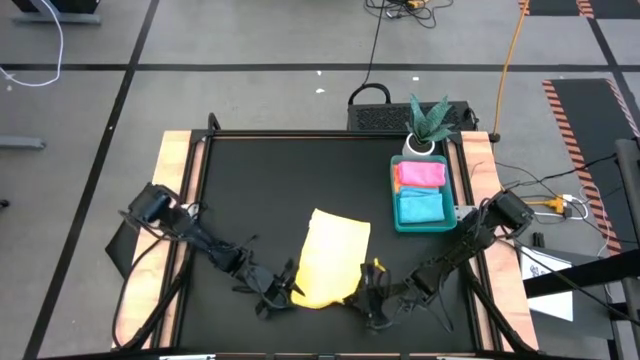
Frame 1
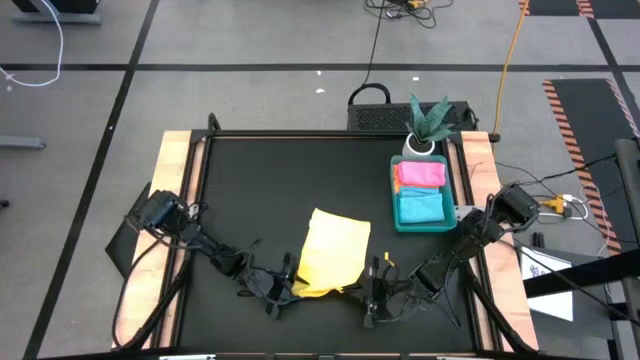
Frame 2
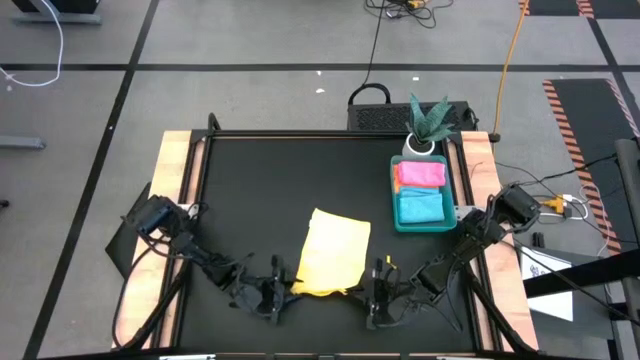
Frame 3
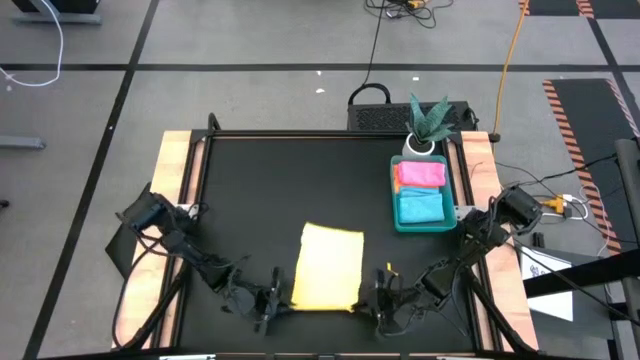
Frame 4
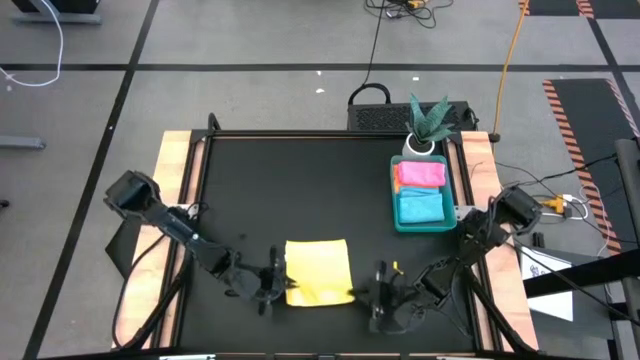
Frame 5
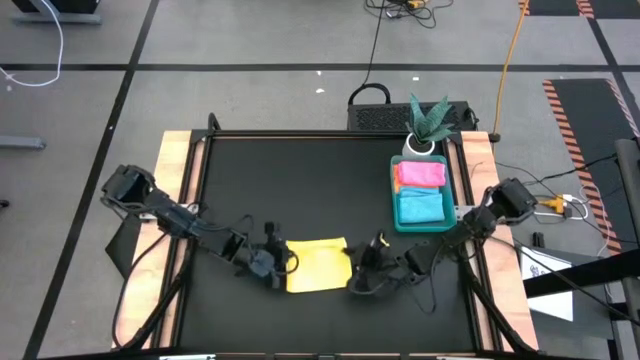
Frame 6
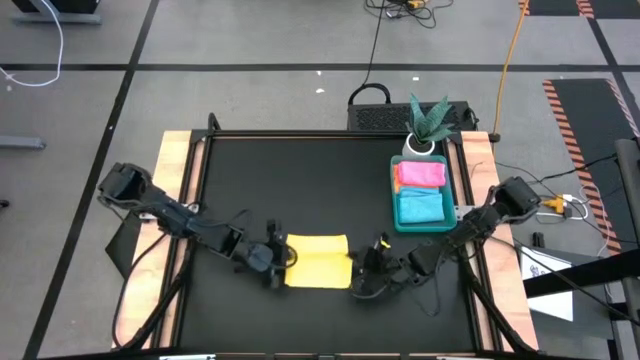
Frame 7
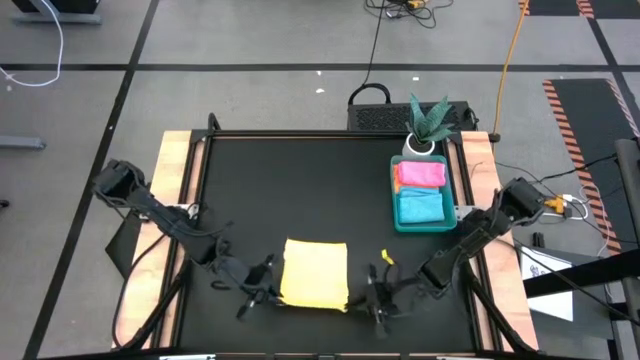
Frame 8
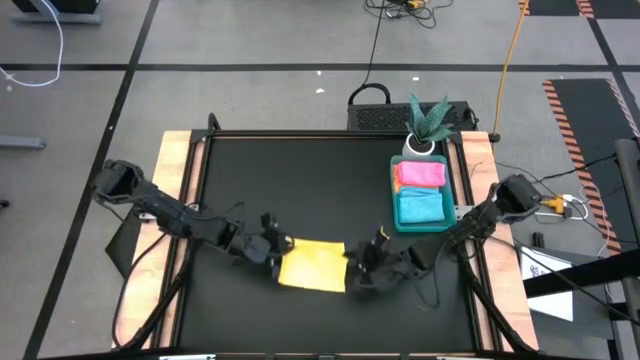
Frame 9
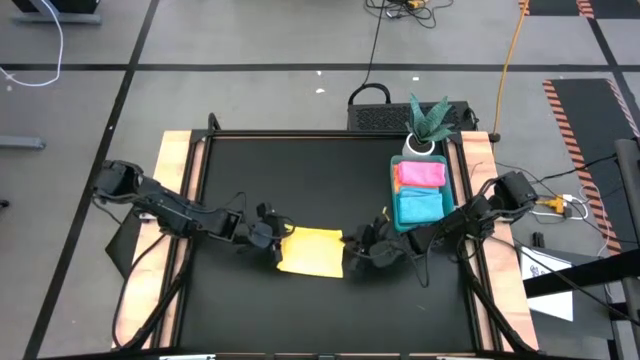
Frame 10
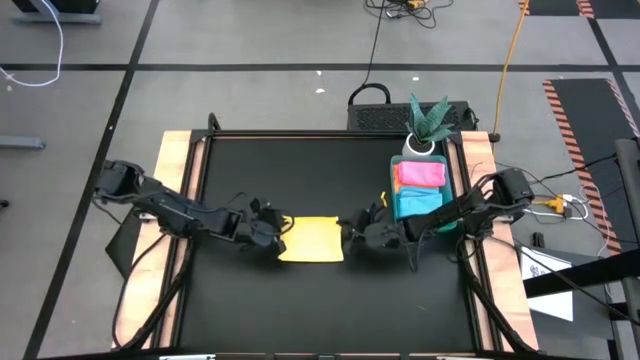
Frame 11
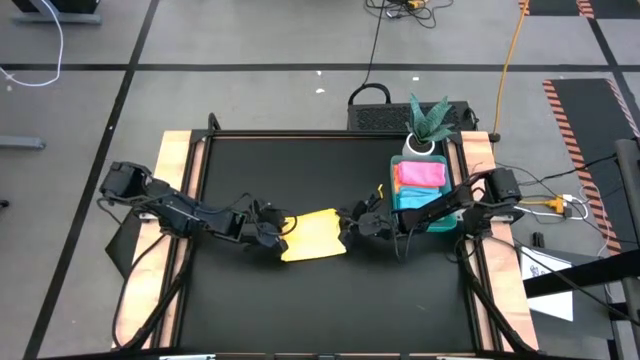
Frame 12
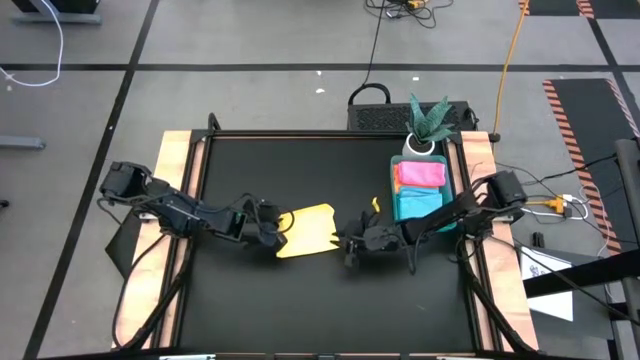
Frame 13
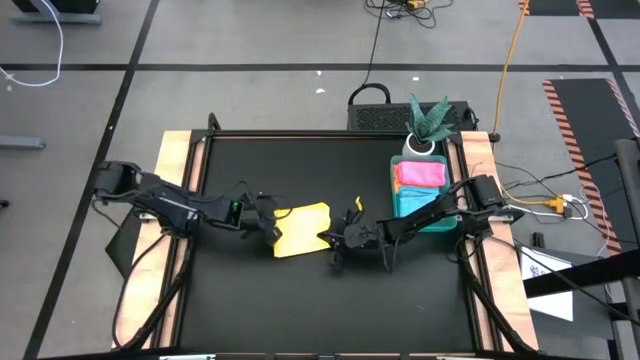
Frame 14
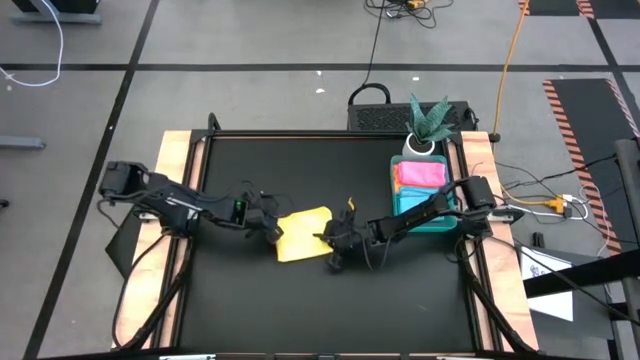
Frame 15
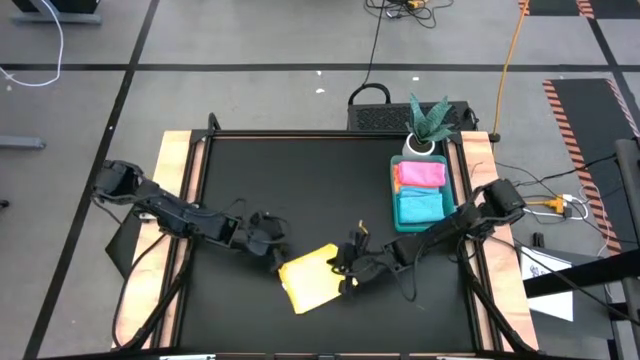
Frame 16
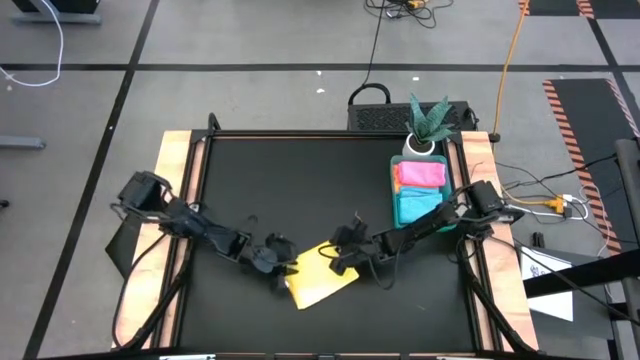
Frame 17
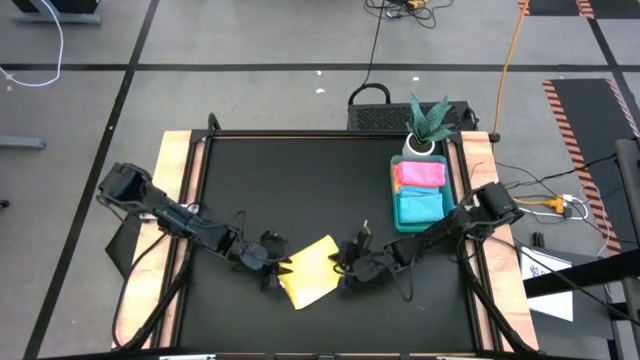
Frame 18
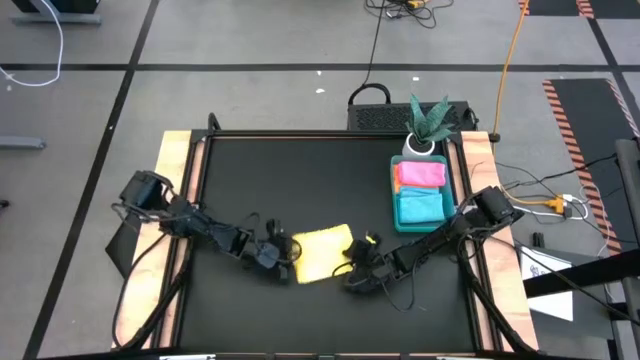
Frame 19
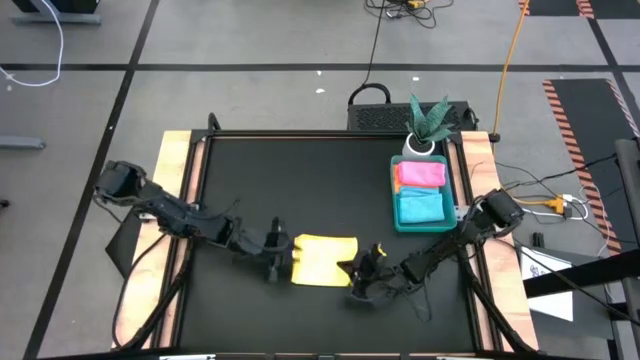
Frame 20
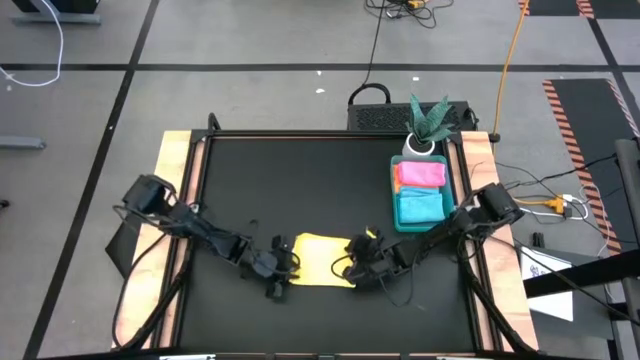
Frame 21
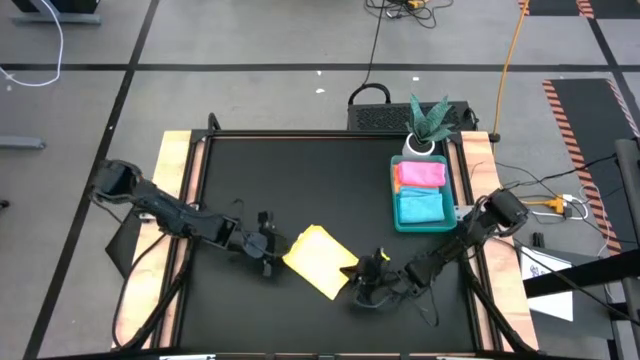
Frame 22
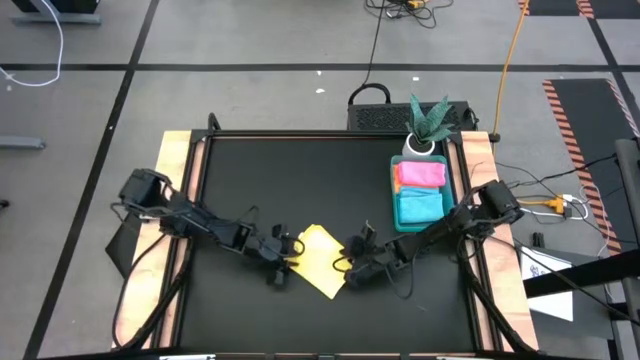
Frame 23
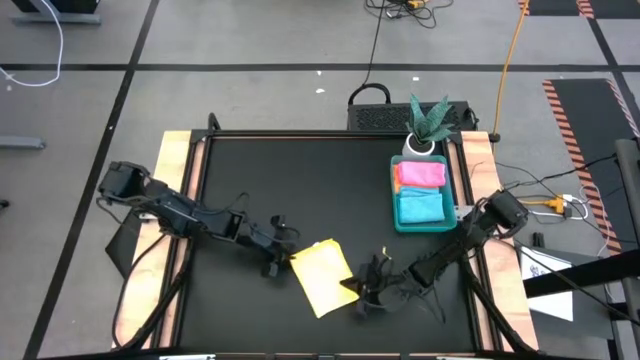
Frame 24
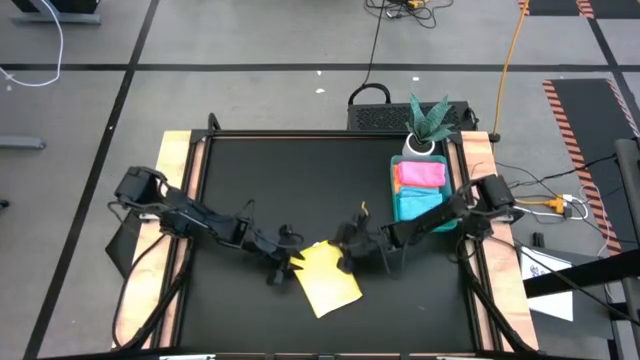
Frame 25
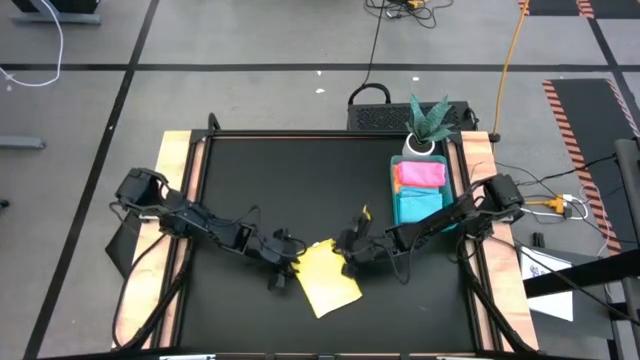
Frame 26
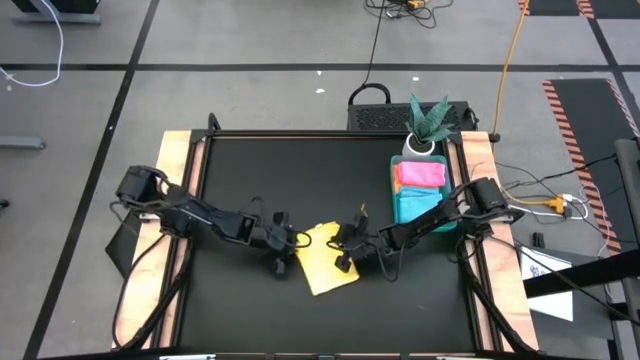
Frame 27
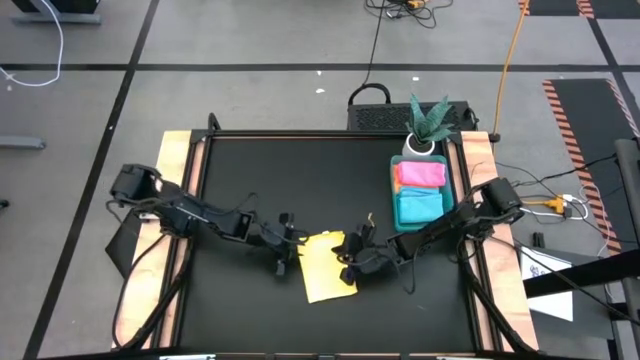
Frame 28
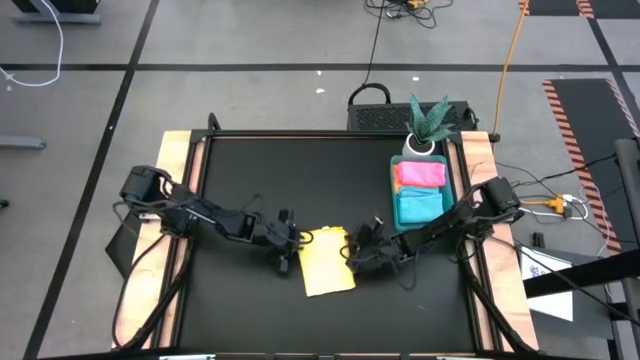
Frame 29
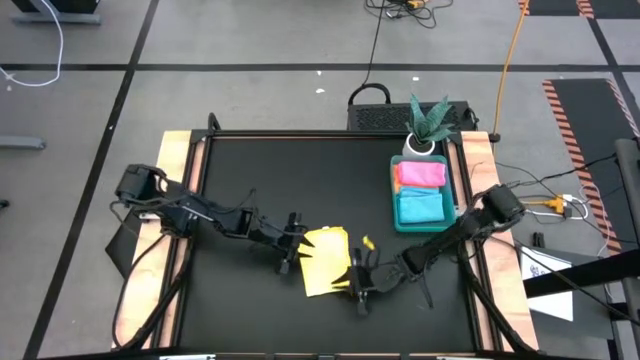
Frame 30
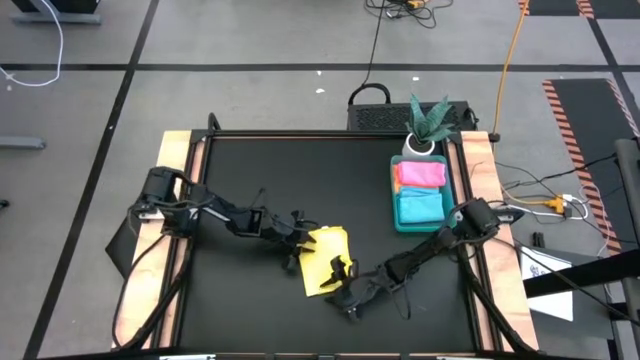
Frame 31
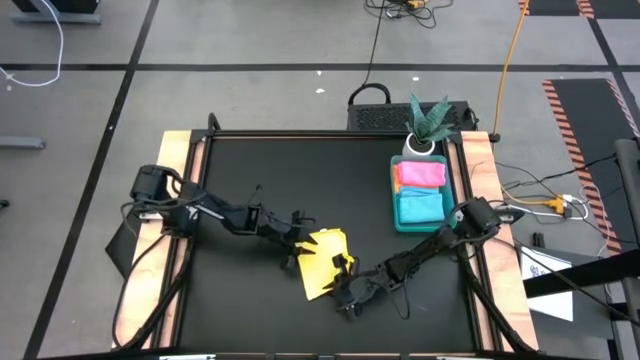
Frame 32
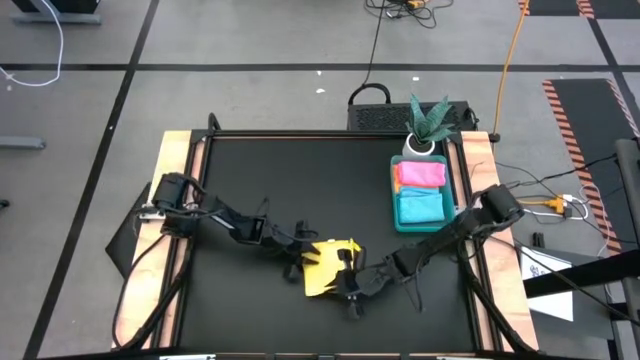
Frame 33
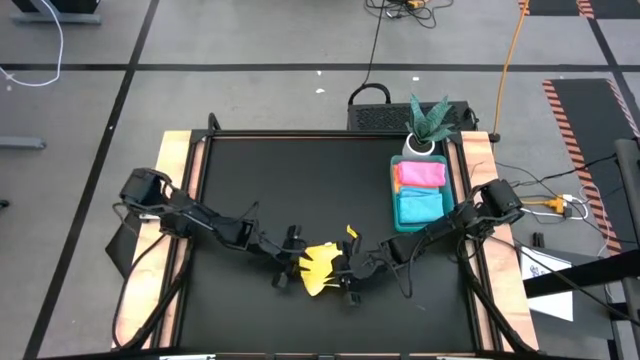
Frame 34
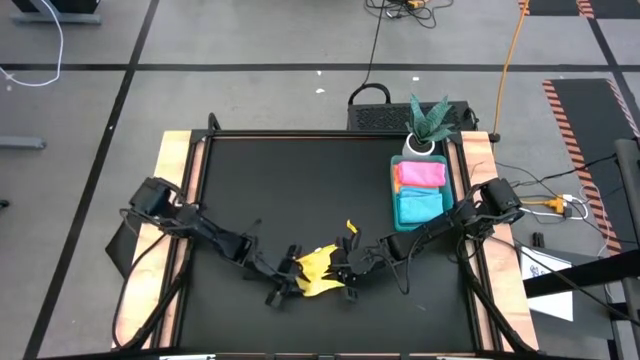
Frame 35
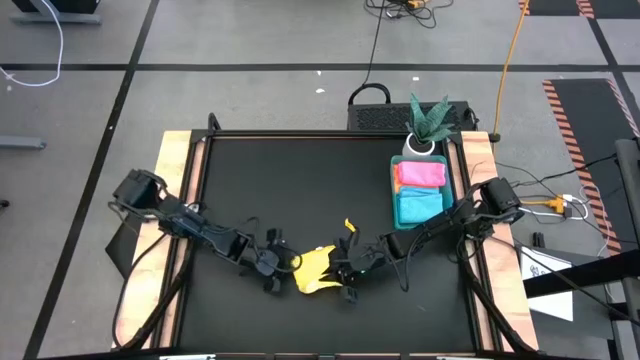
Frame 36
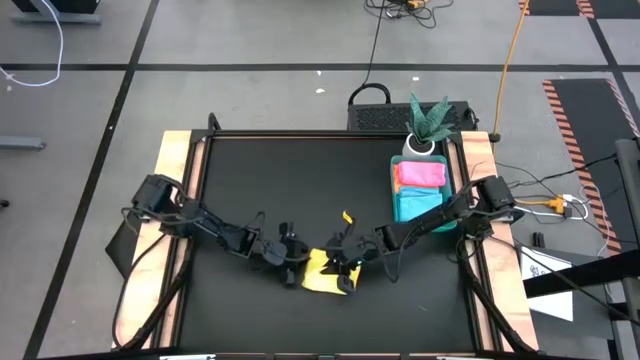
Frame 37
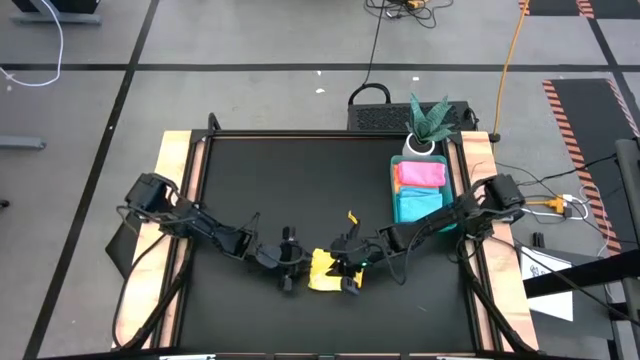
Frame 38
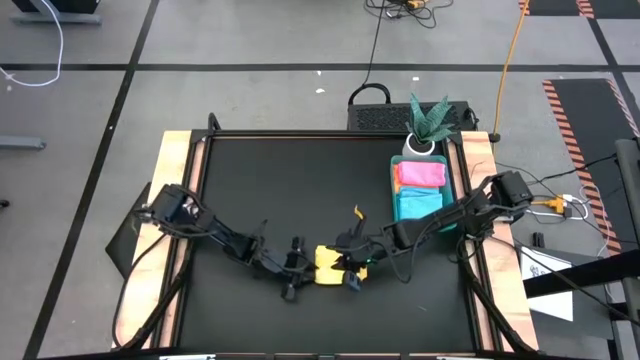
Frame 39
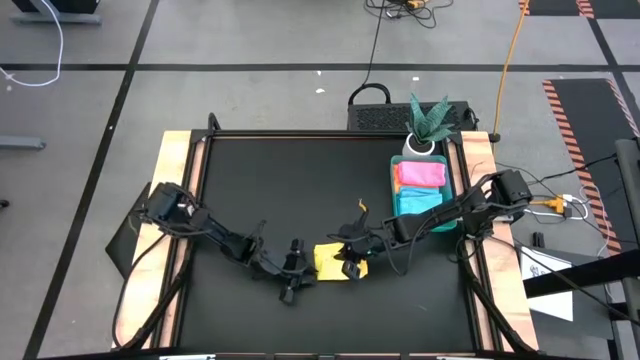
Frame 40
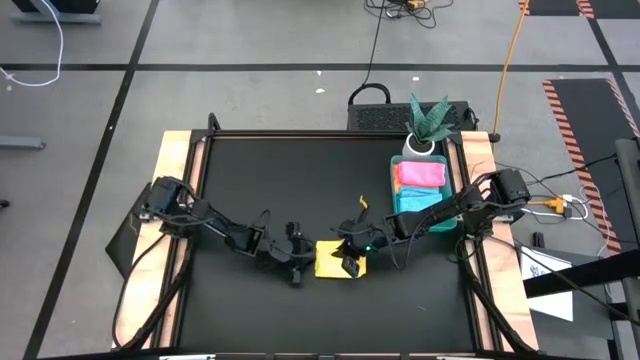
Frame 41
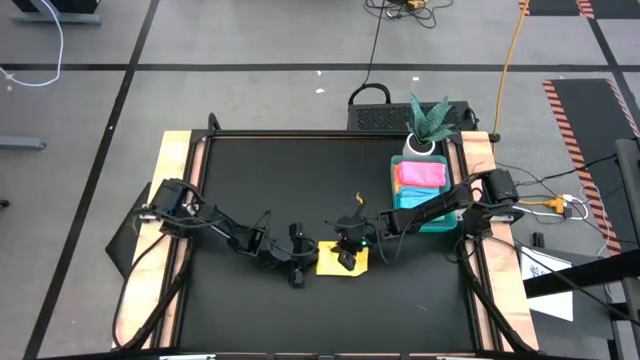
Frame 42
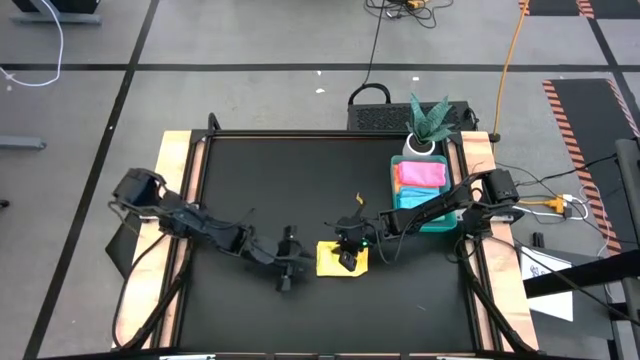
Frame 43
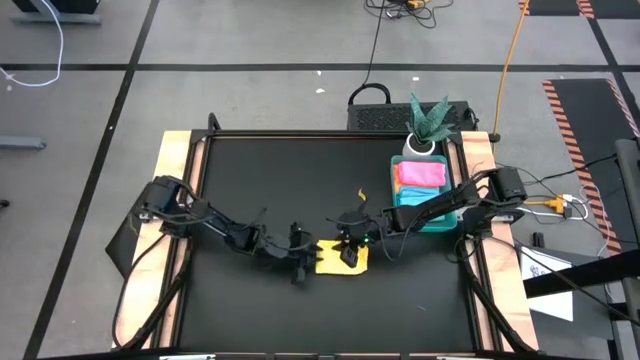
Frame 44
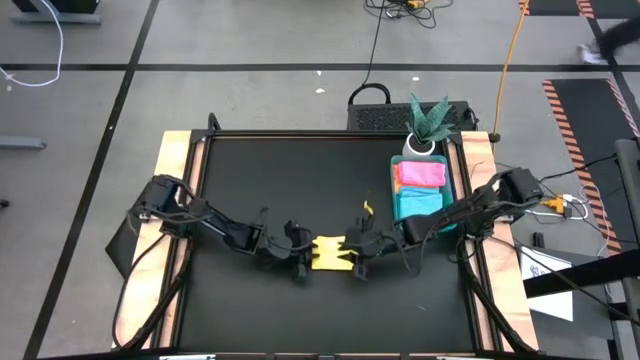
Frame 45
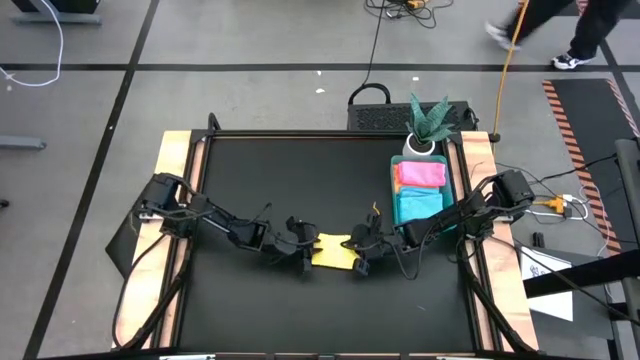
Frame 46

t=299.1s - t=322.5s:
Task: Fold microfiber towels
Fold the yellow microfiber cloth
